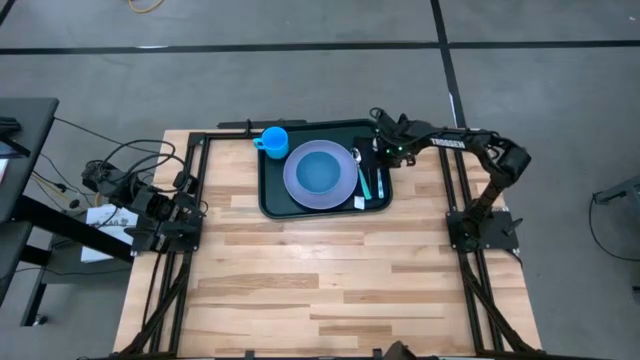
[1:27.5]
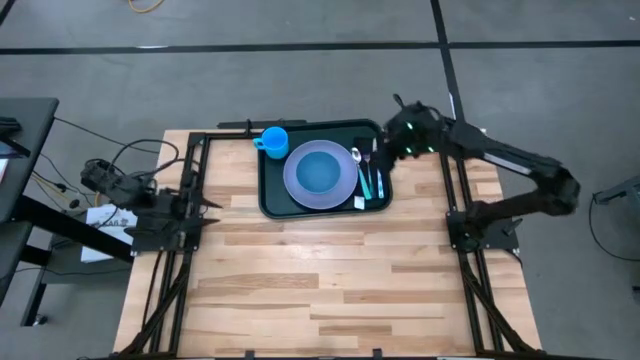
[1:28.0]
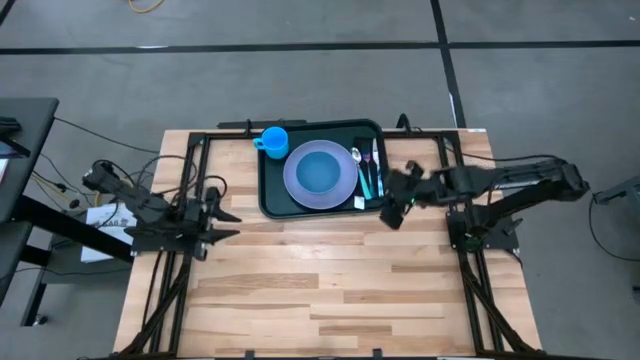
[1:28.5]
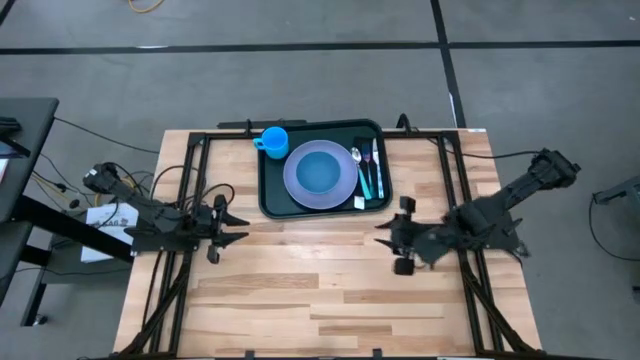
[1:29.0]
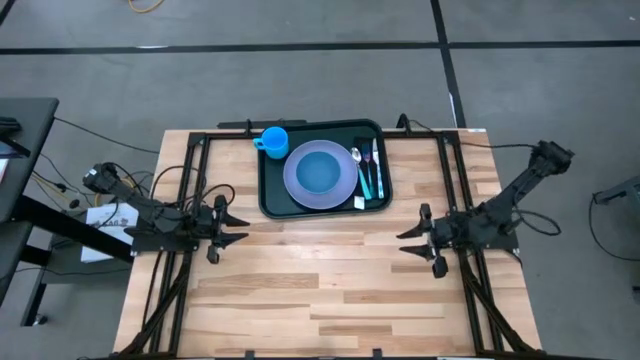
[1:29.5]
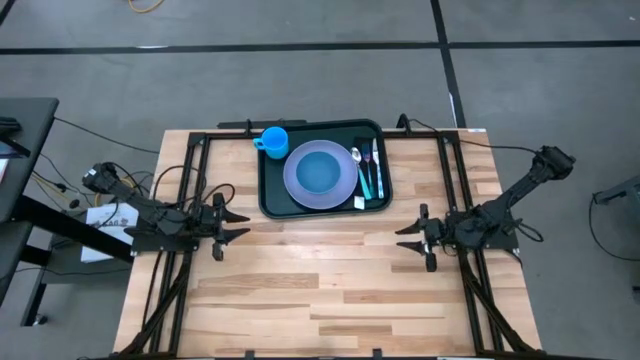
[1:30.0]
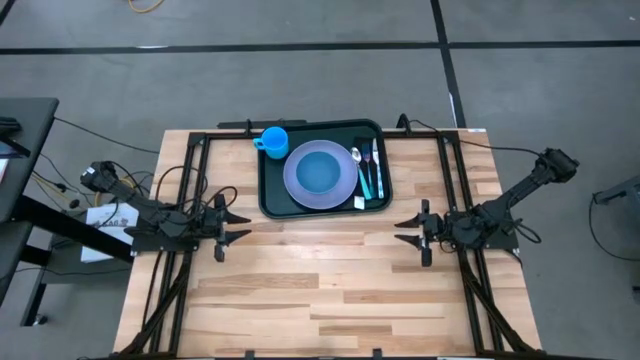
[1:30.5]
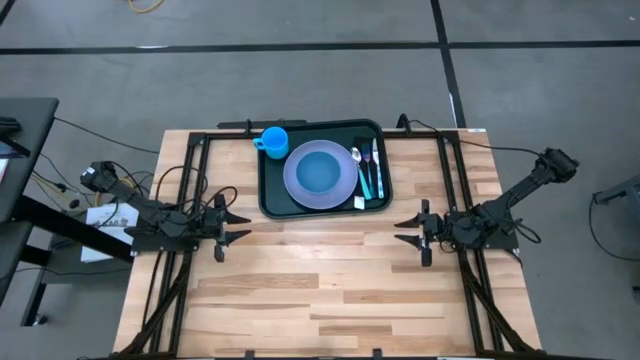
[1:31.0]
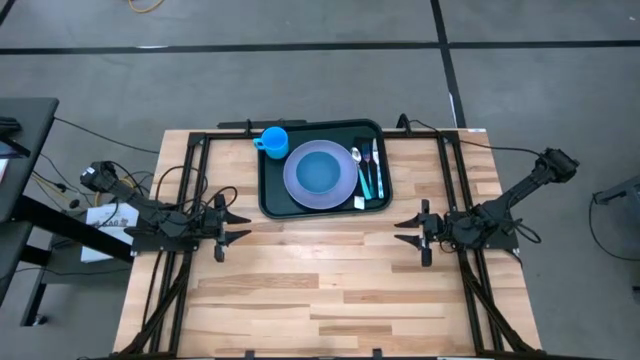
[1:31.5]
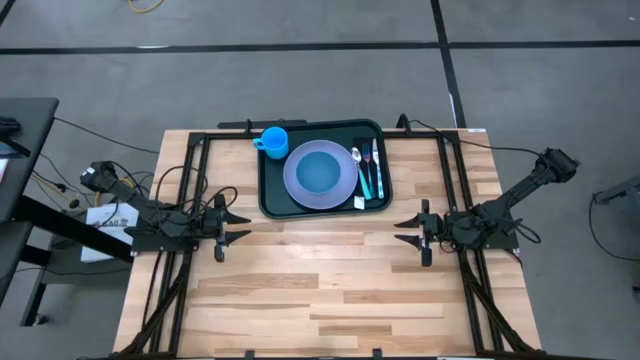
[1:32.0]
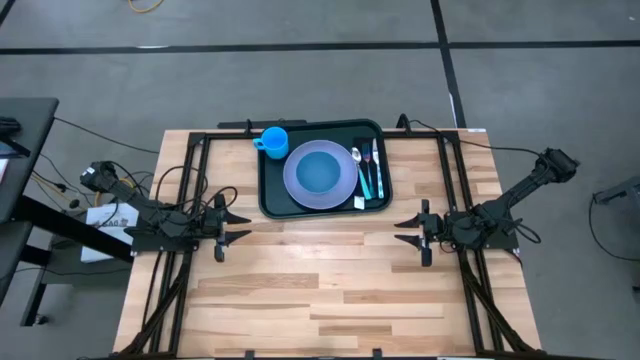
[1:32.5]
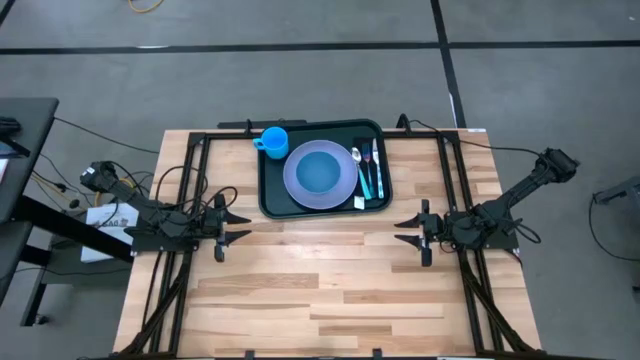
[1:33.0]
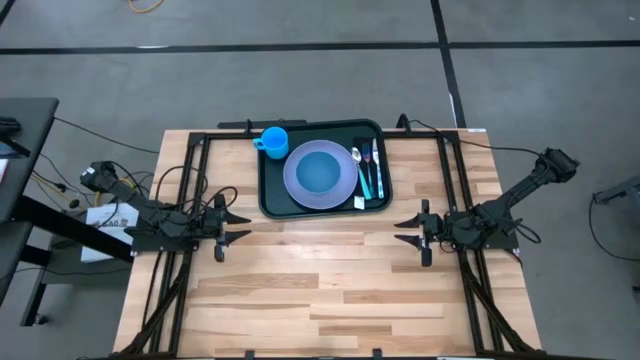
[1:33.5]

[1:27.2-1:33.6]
Task: Set up tray
Return to Home Position

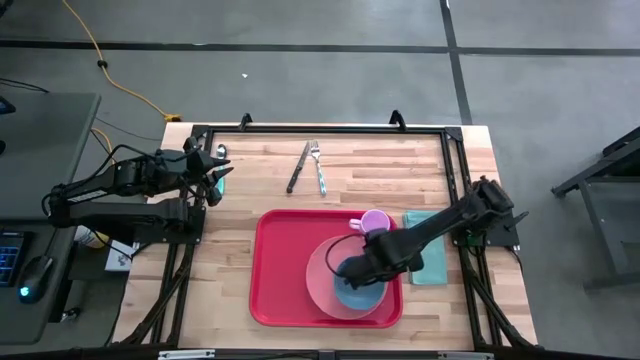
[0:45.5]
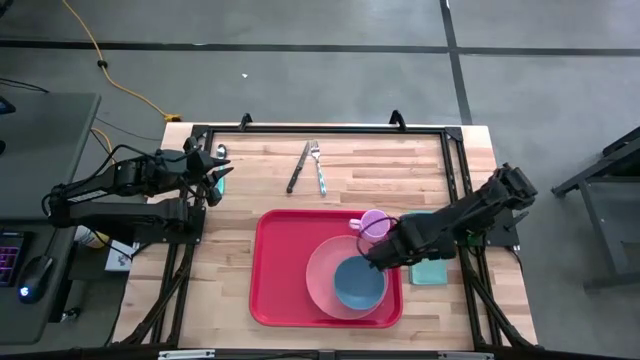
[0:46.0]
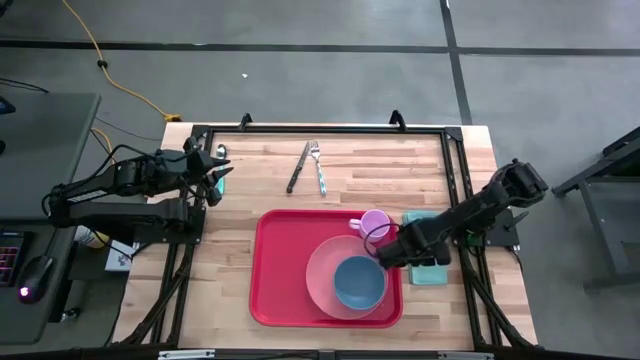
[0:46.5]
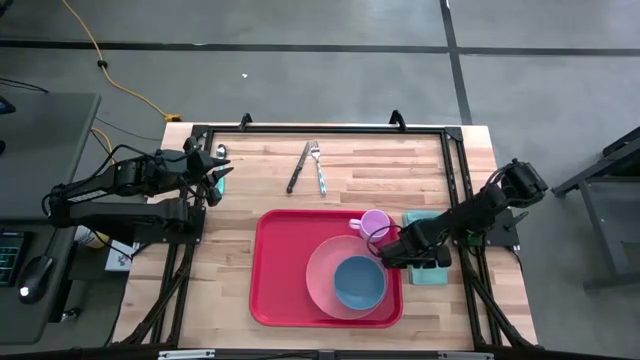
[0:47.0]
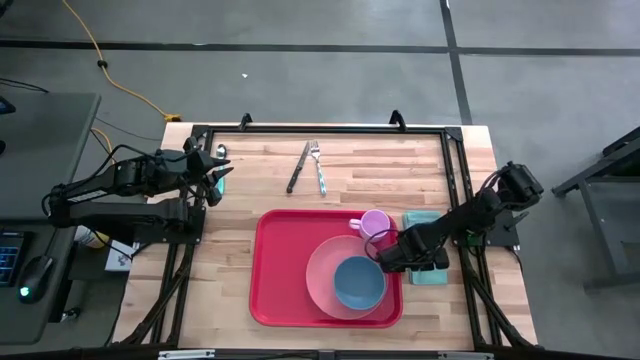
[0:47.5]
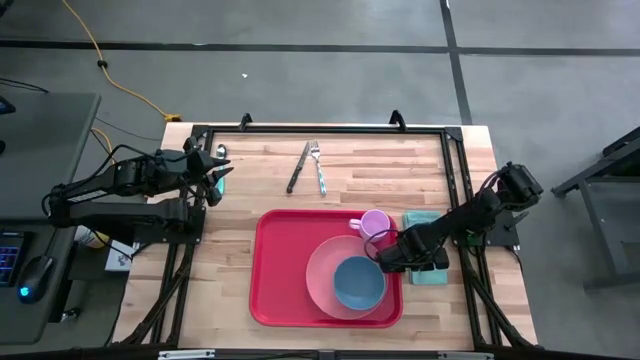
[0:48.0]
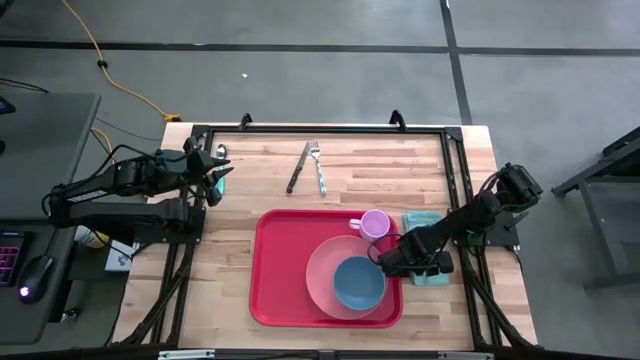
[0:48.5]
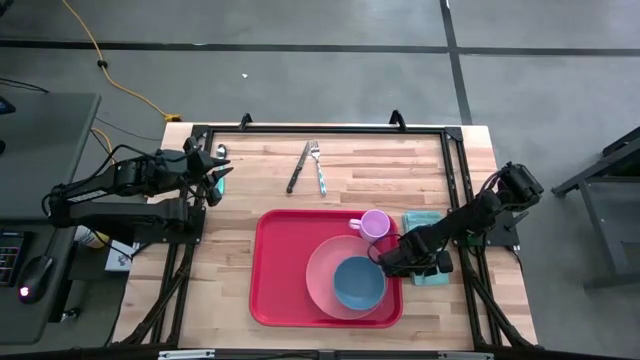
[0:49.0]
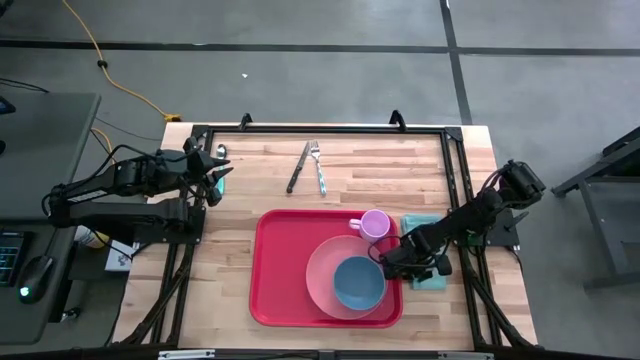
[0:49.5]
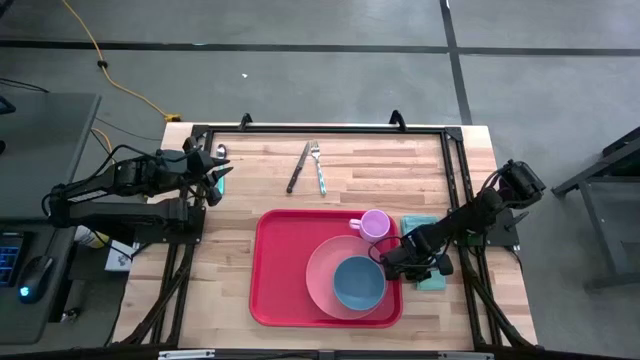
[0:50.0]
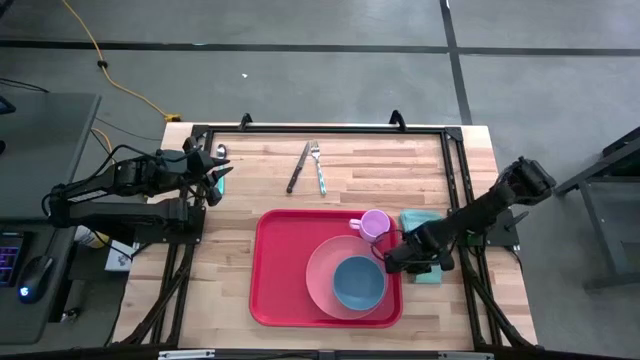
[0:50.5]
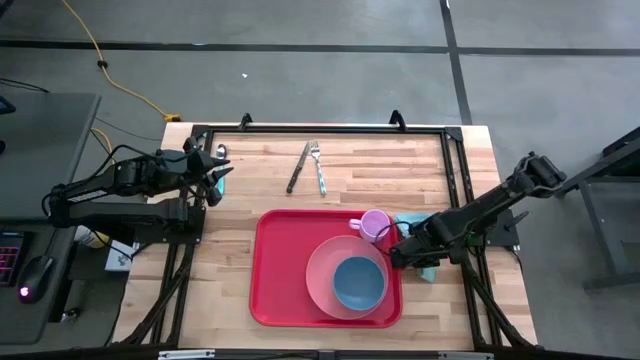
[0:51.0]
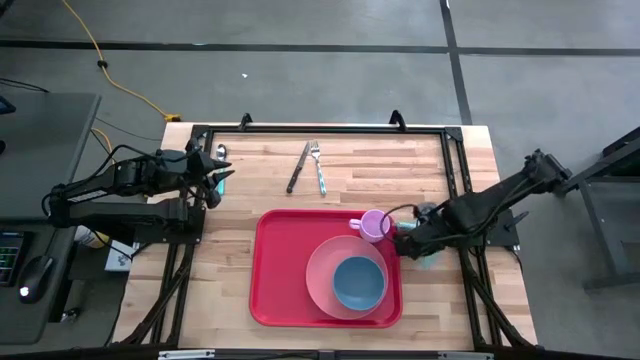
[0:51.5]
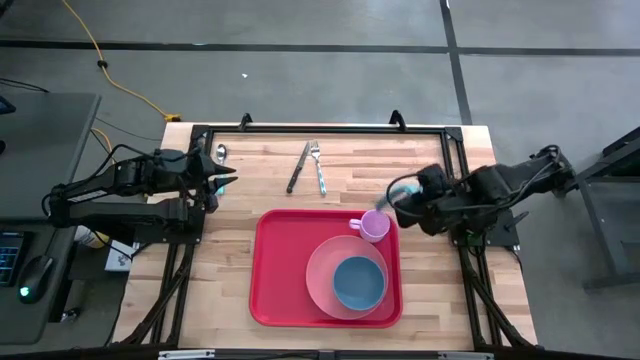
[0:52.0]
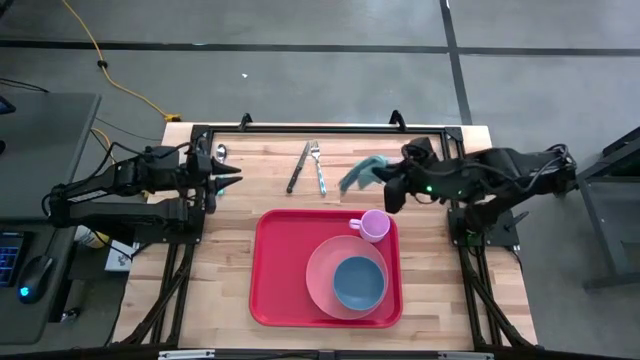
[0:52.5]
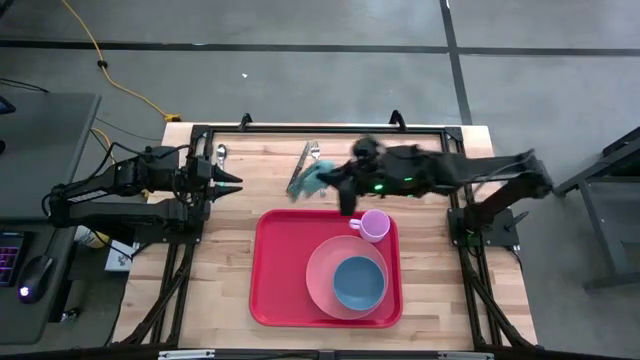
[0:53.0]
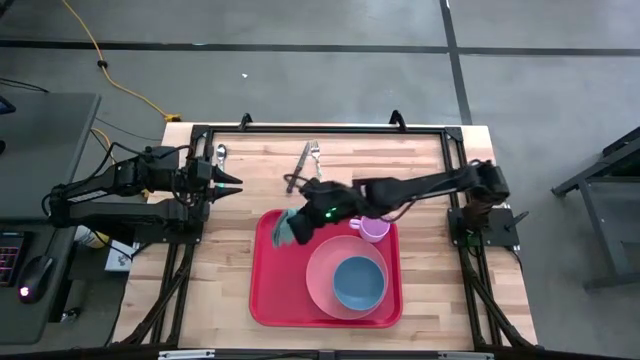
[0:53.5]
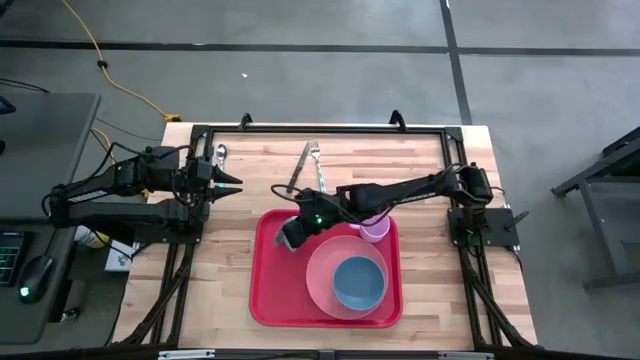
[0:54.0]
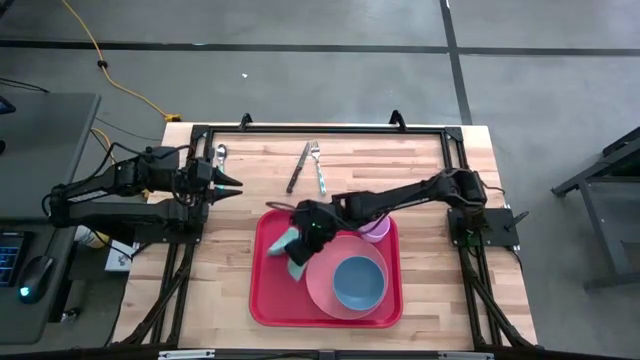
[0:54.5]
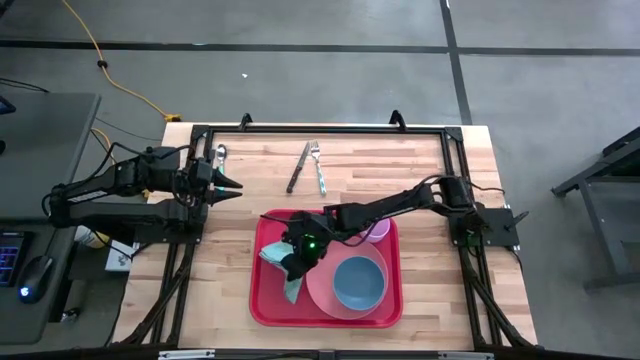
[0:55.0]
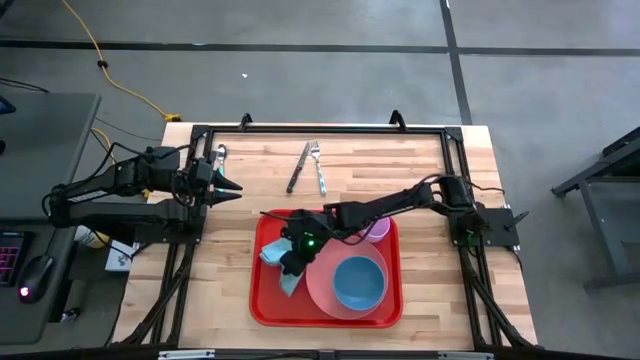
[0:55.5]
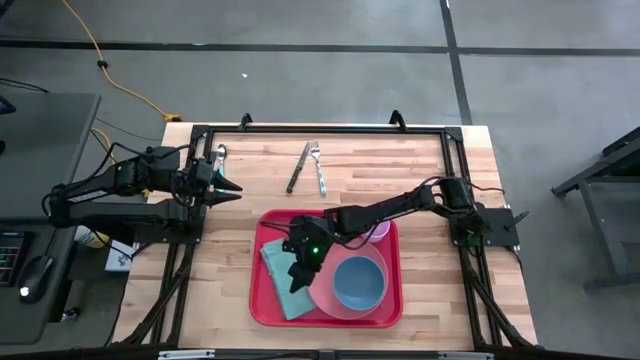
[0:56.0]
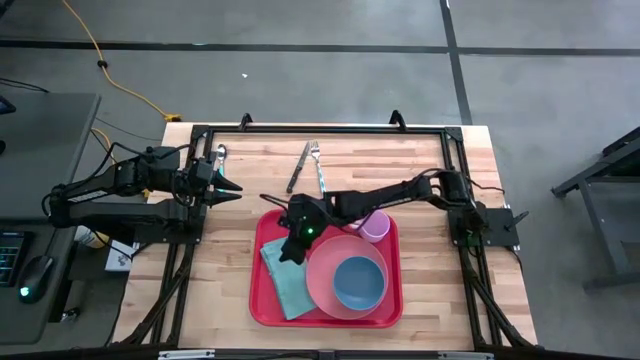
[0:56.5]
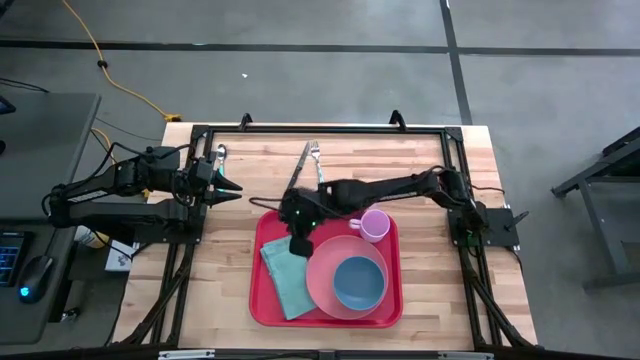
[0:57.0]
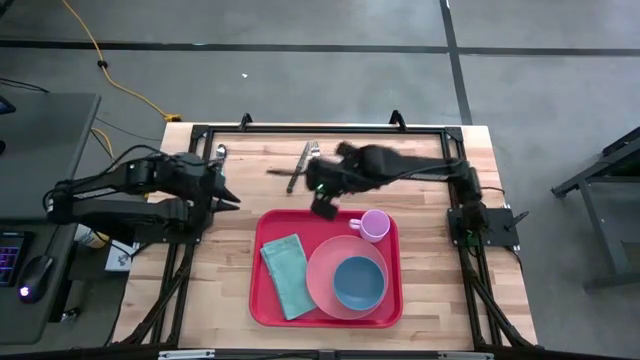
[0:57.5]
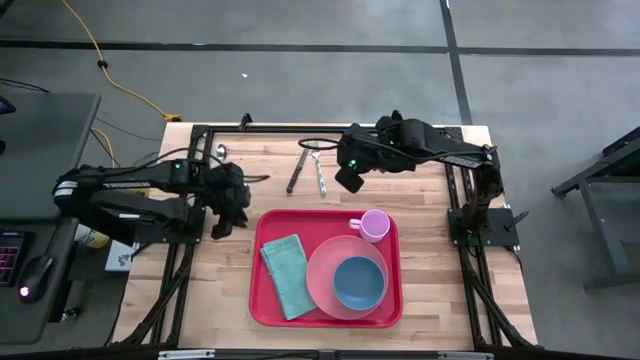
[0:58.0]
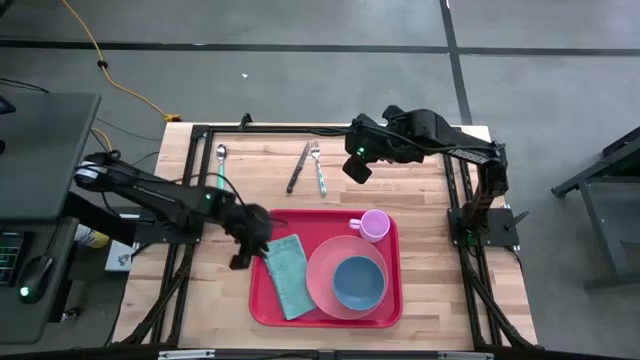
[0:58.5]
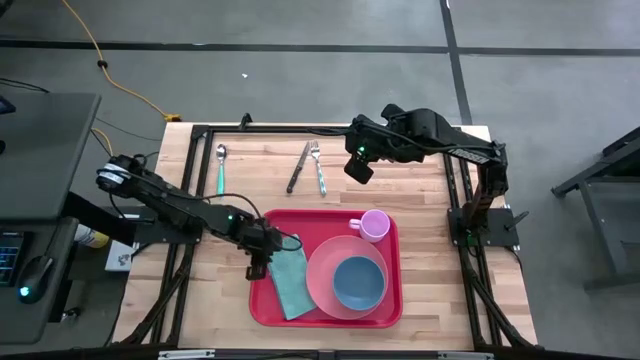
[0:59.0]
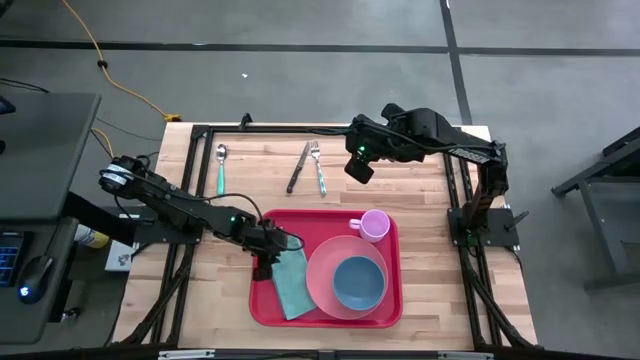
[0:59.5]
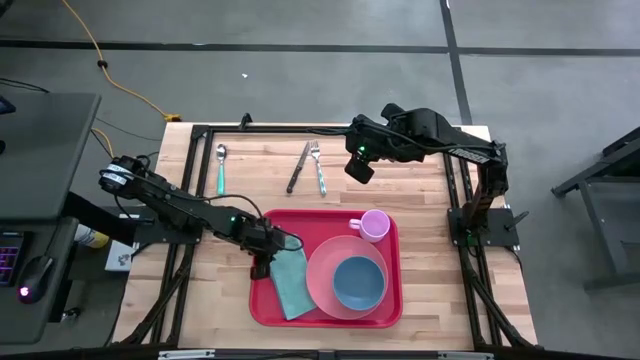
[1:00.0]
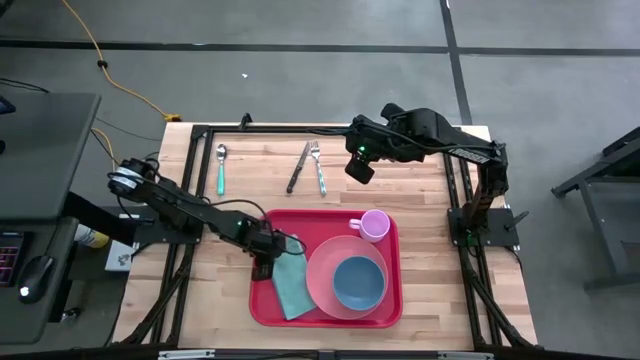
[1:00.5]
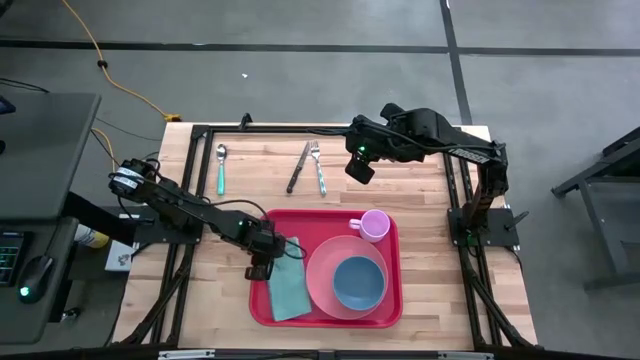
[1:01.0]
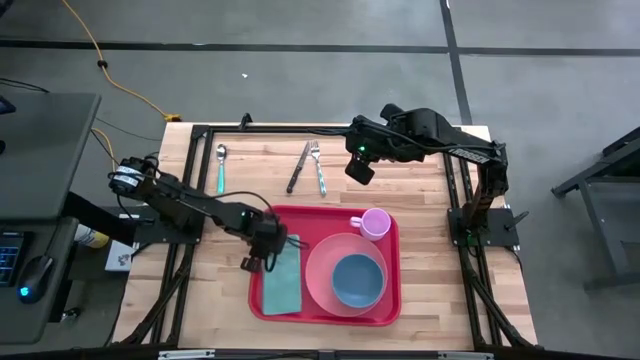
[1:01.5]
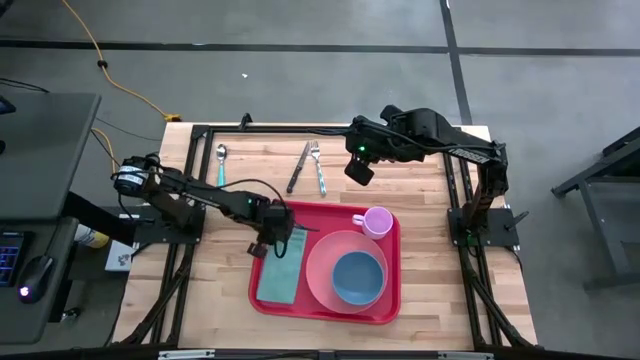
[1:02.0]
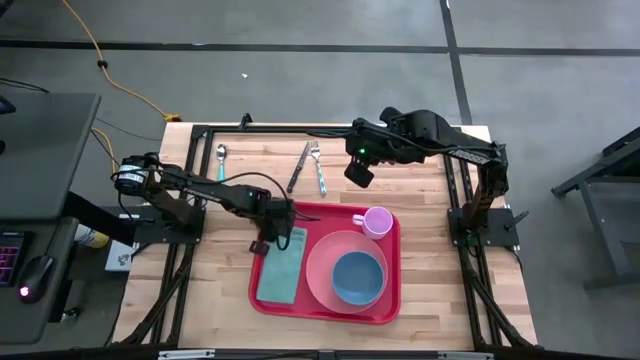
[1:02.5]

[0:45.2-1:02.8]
Task: Set up tray
Put the blue napkin to the left of the pink plate on the red tray
